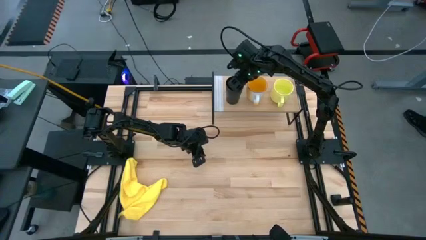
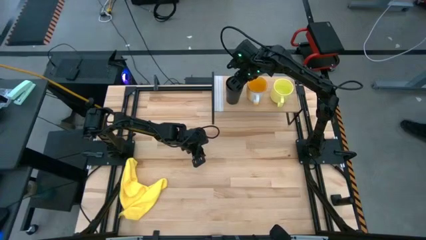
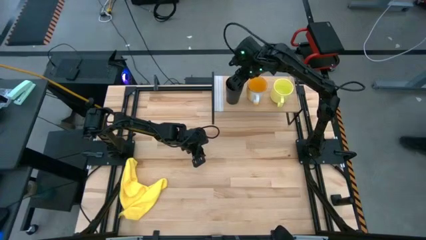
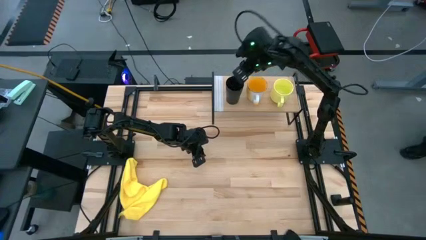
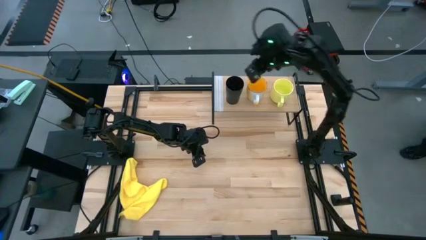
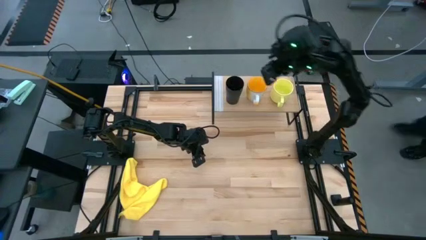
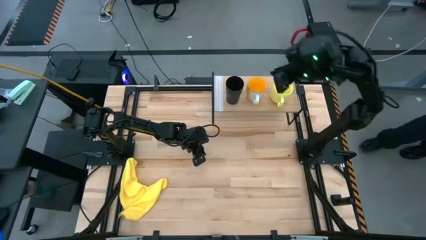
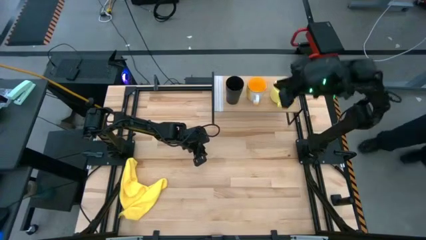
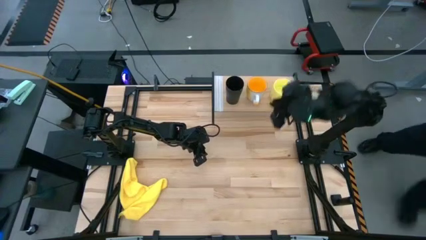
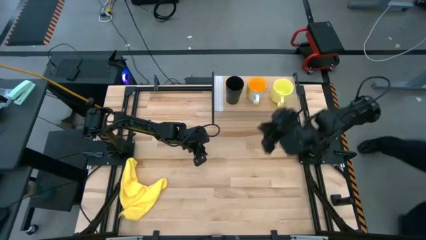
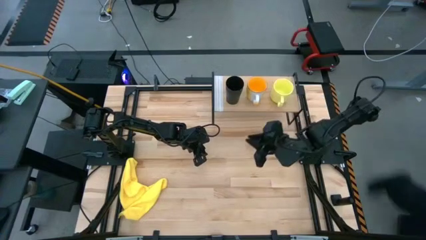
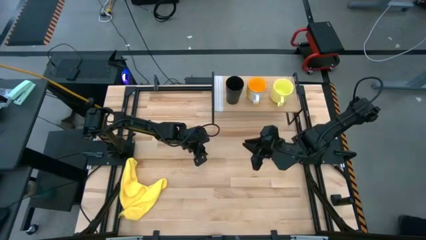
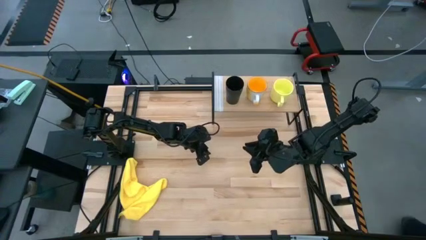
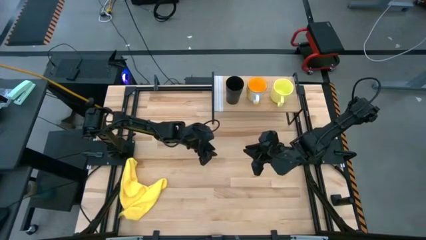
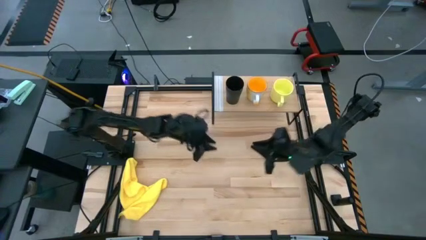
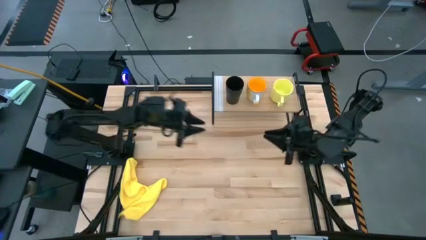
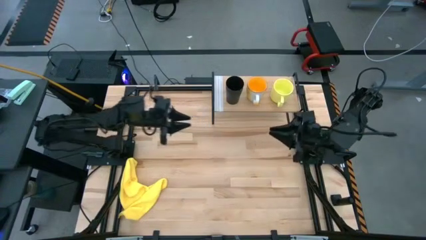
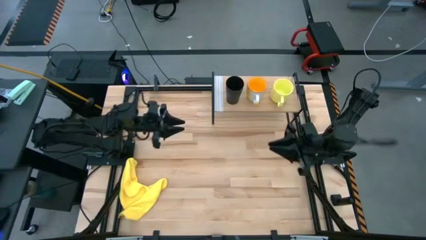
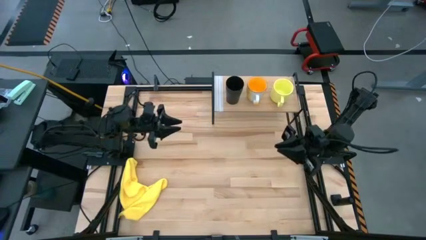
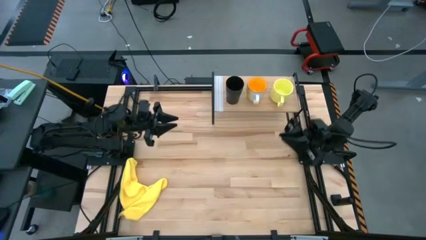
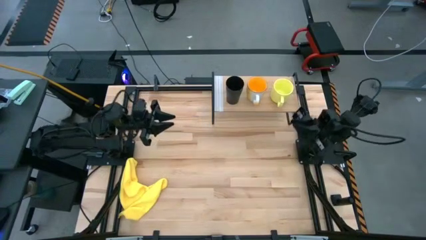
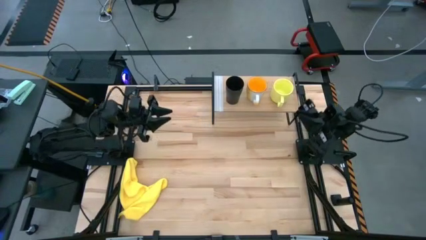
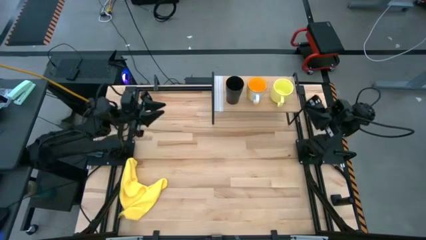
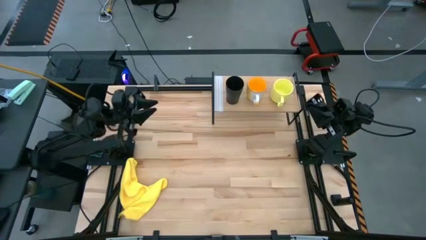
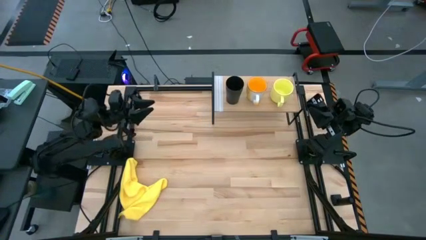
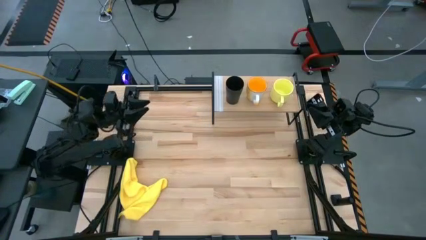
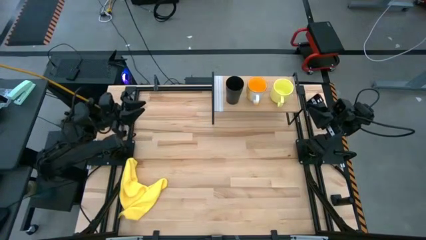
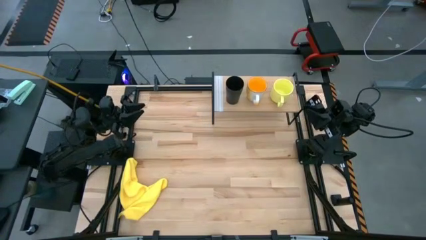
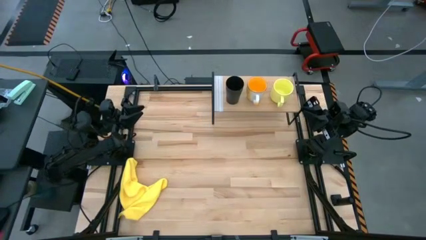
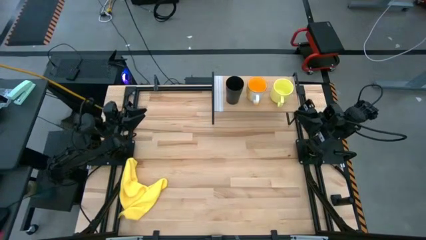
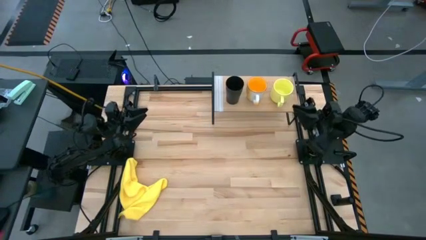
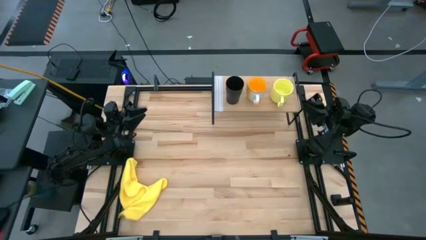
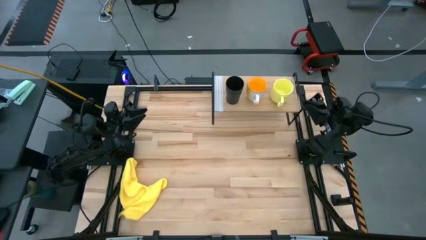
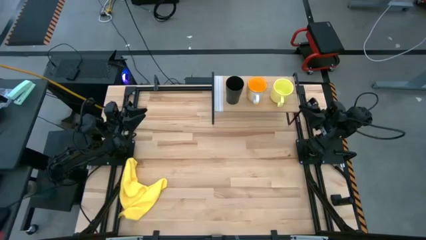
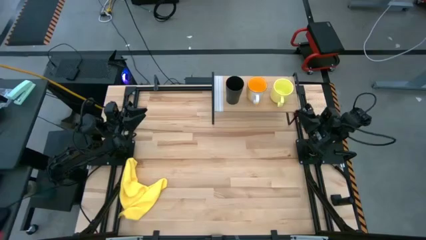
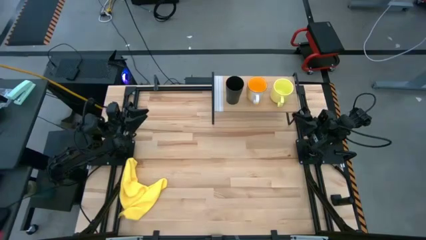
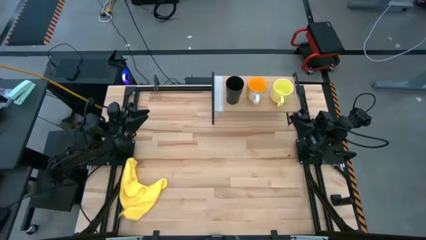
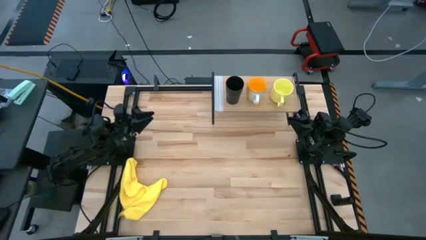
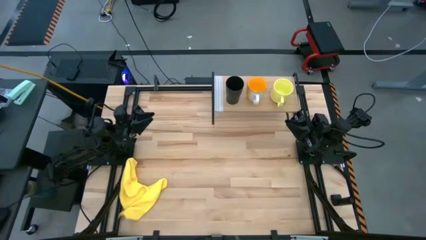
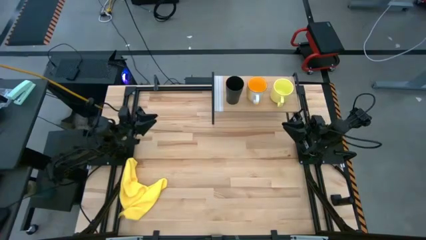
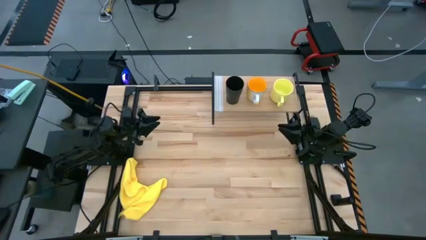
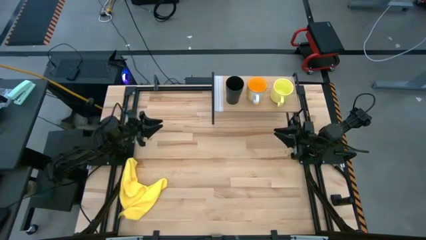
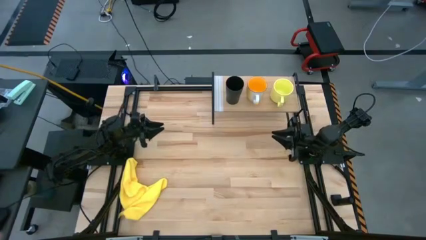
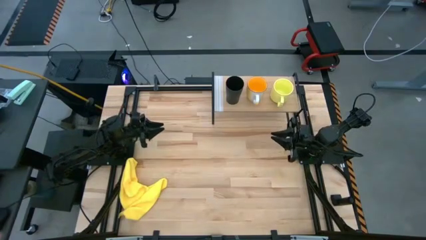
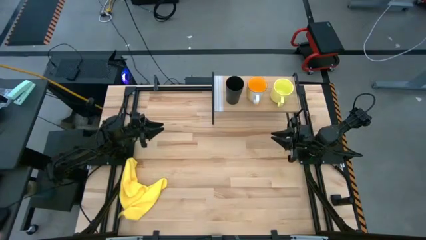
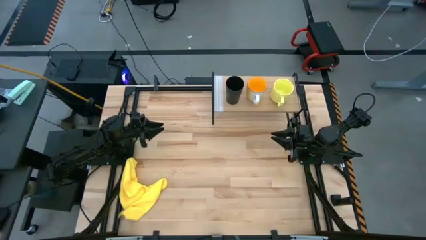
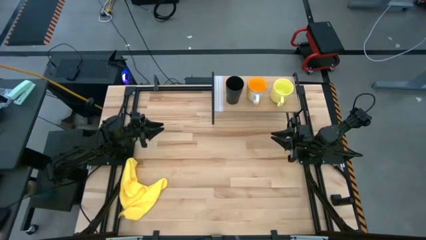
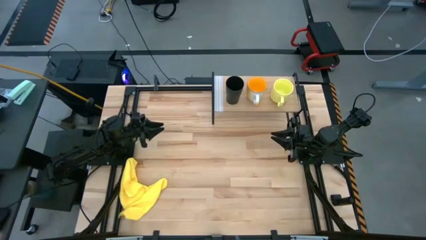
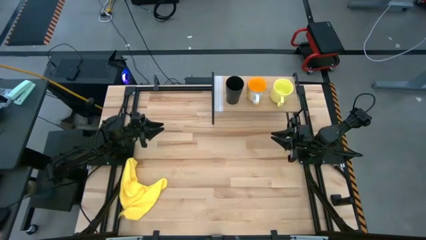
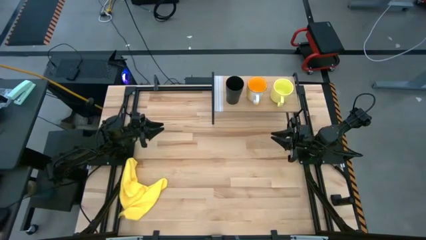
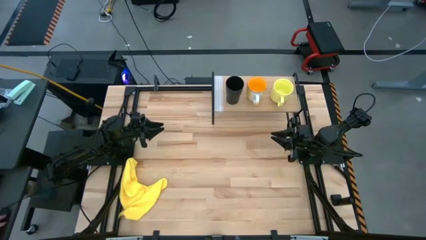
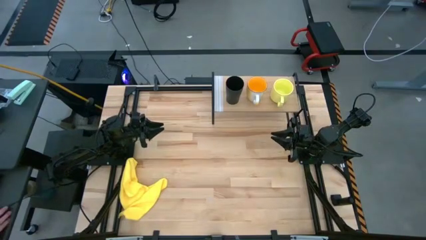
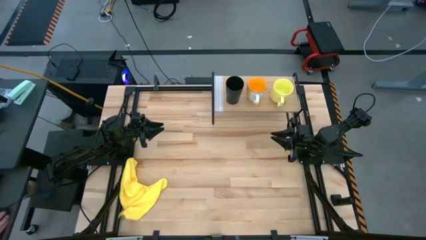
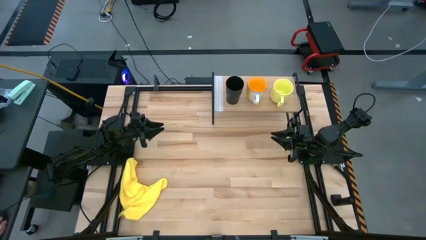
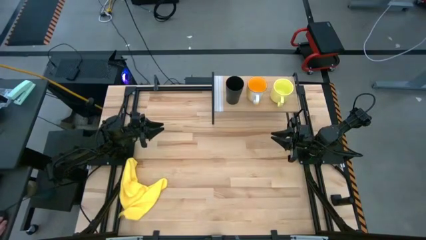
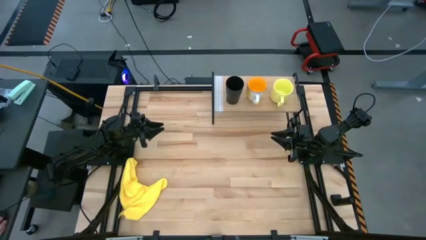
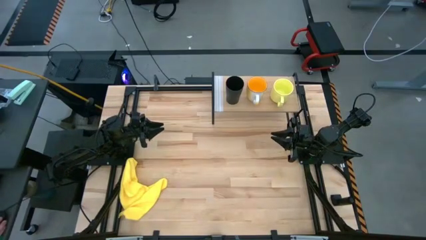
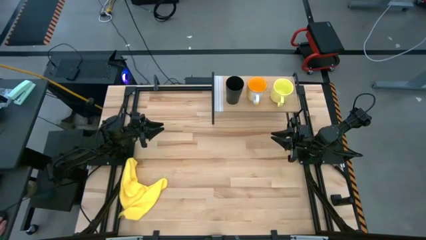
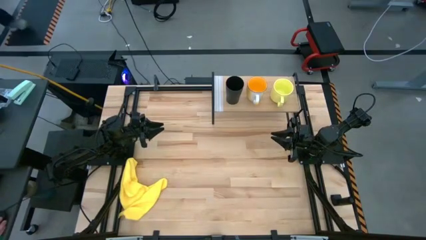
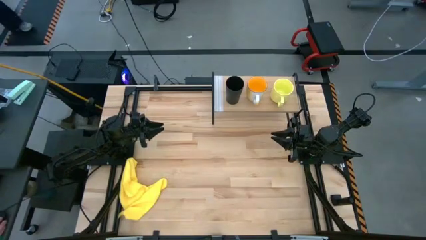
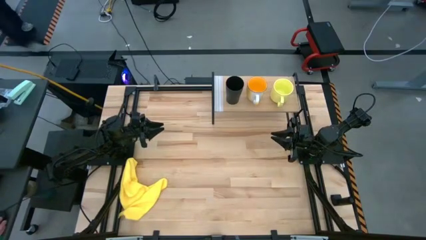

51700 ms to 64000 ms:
Task: Stack small to large cups/mugs on shelf
Return to Home Position

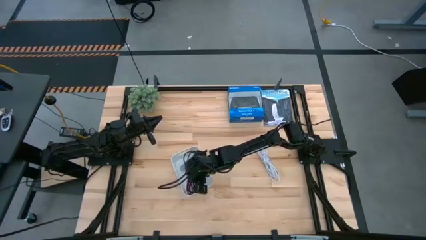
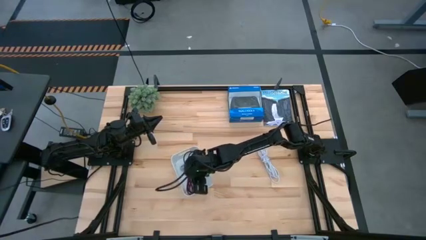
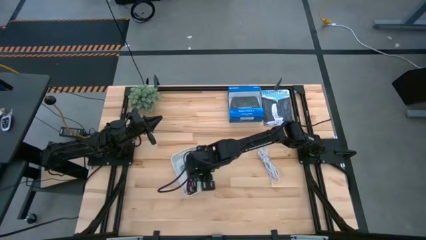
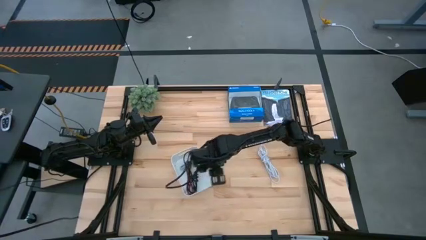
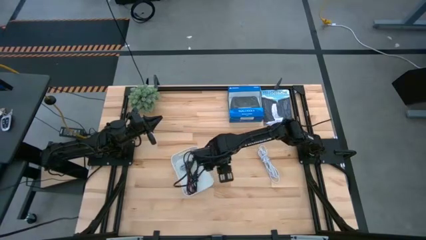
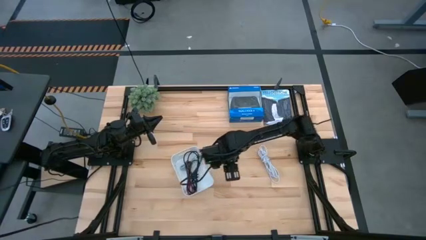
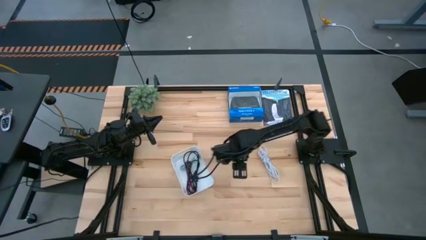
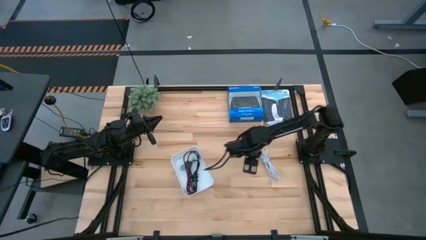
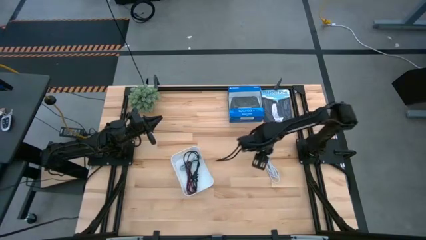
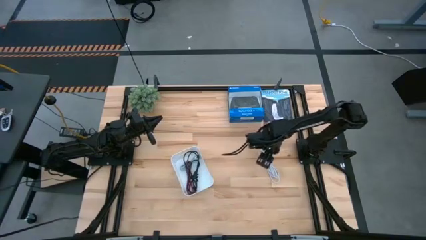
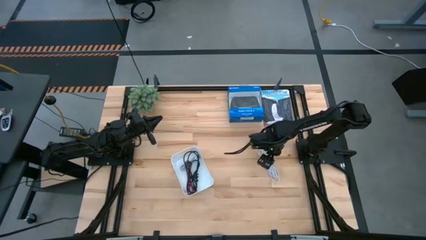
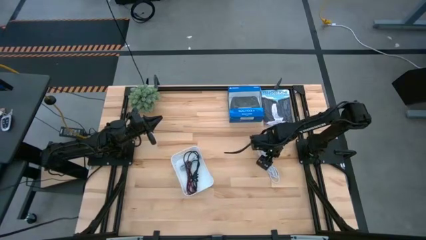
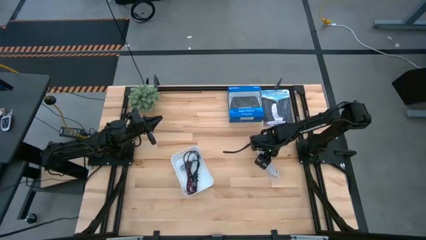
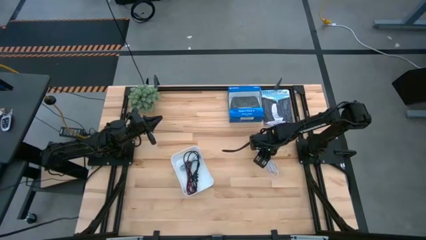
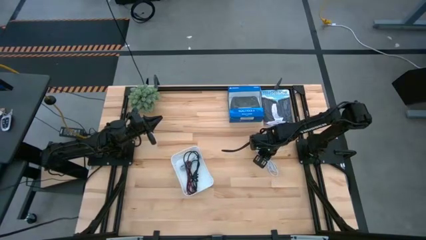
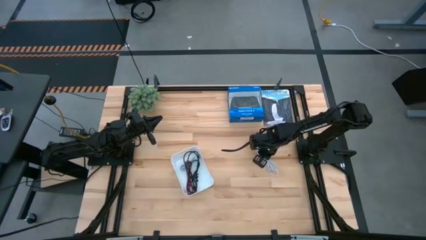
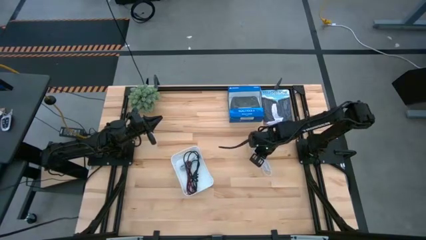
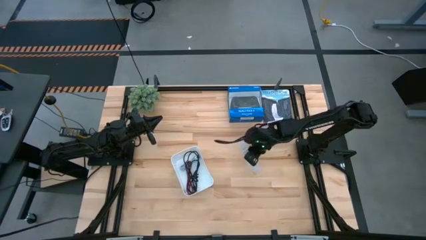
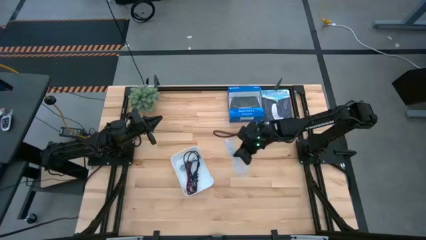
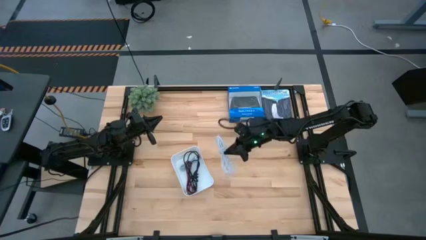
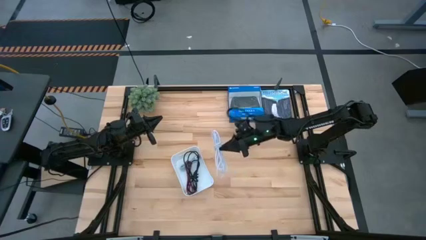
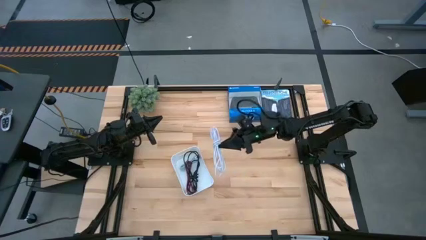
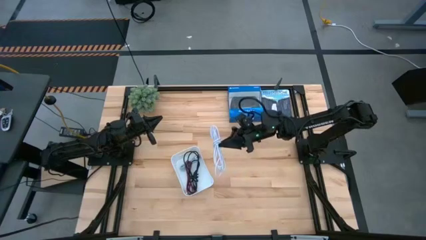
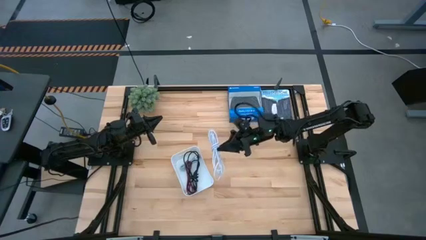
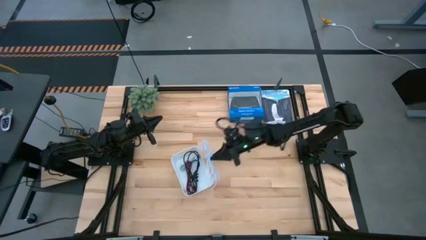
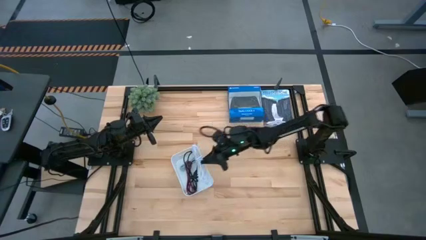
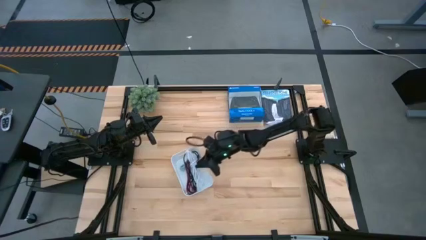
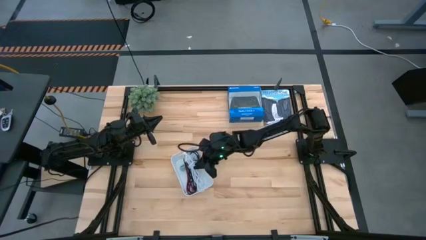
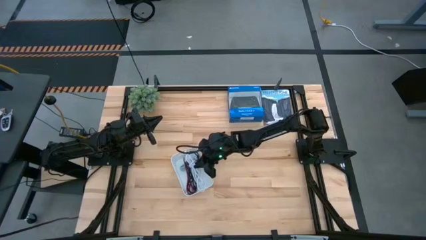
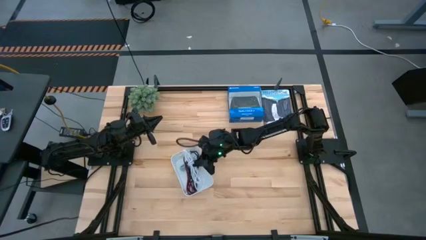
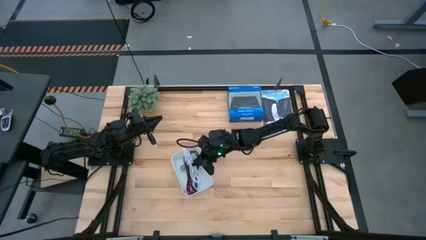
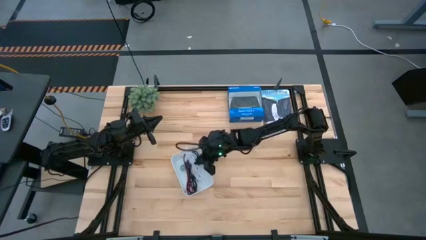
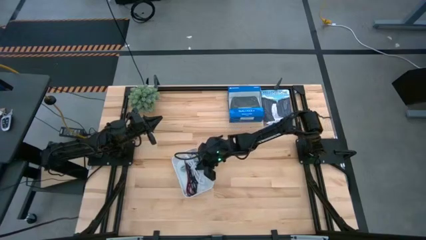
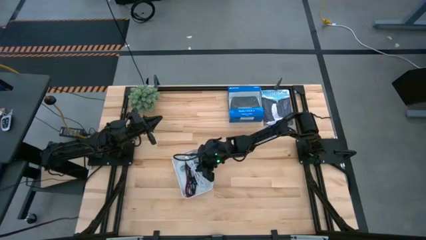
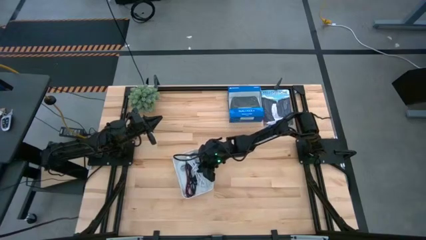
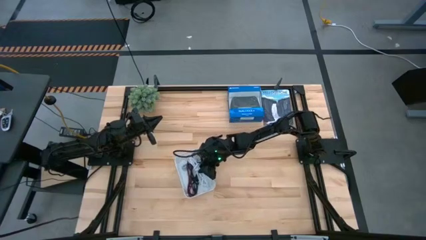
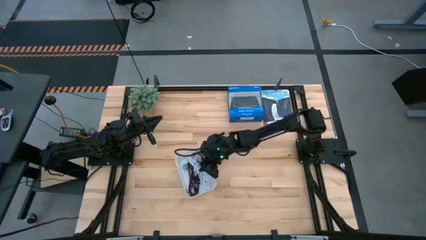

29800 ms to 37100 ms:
Task: Pick and place USB-C Cables
Put the white charger cable into the white bin
